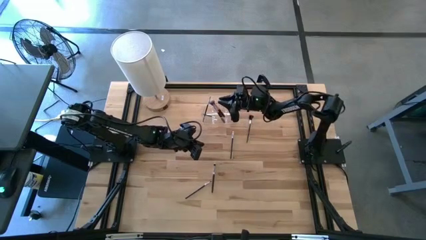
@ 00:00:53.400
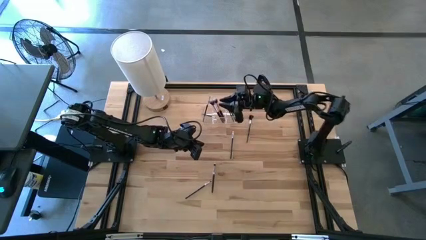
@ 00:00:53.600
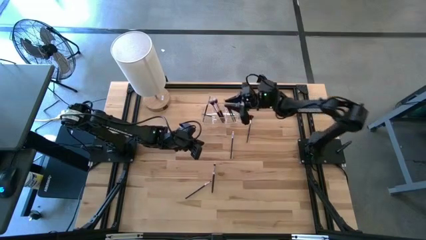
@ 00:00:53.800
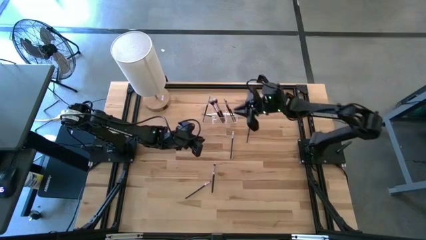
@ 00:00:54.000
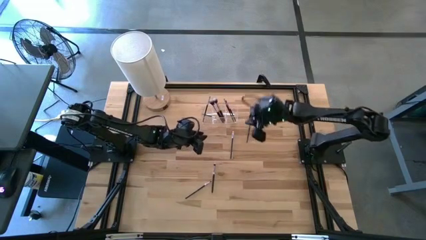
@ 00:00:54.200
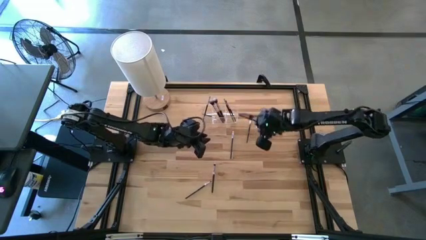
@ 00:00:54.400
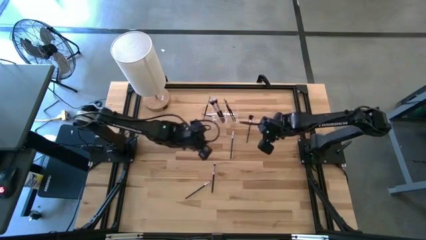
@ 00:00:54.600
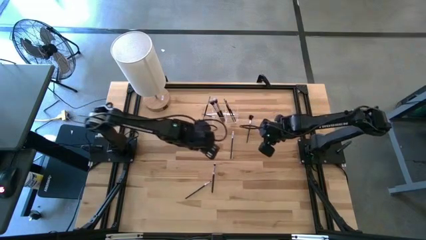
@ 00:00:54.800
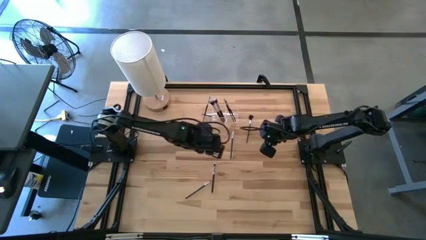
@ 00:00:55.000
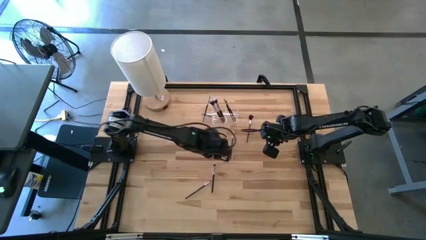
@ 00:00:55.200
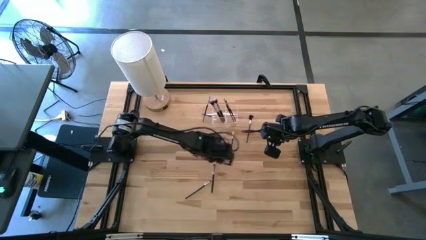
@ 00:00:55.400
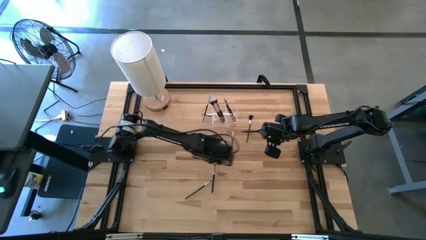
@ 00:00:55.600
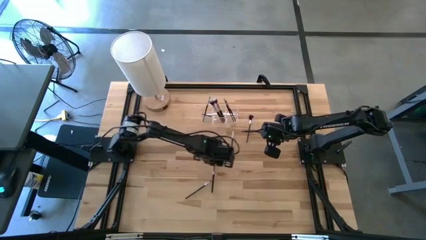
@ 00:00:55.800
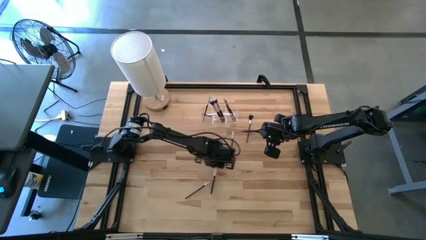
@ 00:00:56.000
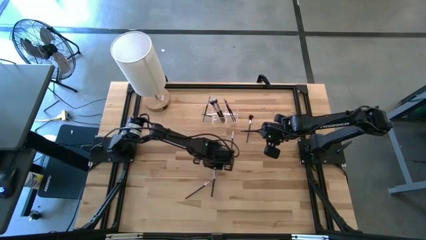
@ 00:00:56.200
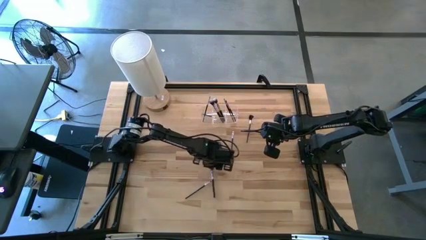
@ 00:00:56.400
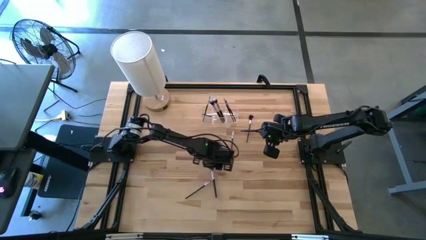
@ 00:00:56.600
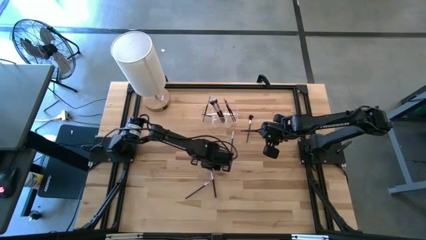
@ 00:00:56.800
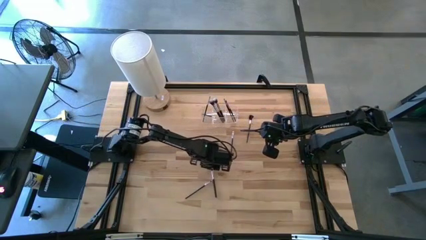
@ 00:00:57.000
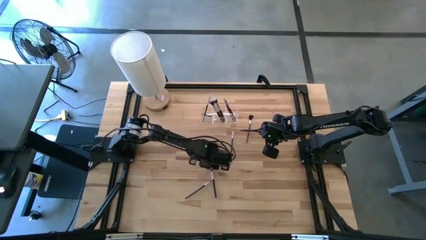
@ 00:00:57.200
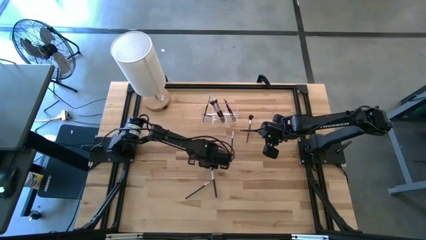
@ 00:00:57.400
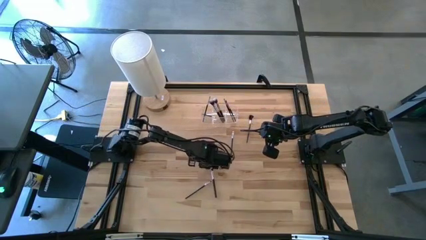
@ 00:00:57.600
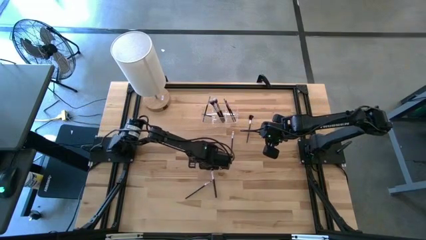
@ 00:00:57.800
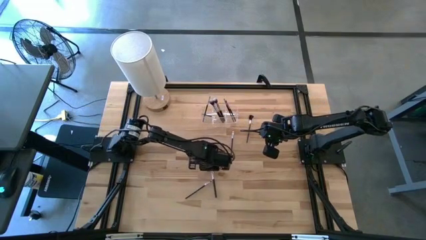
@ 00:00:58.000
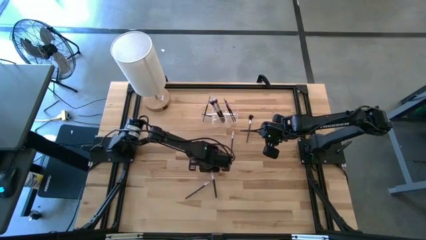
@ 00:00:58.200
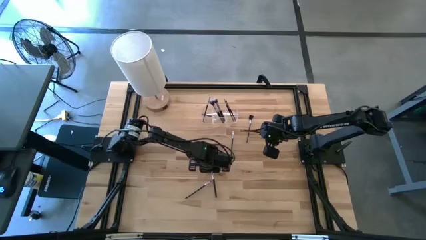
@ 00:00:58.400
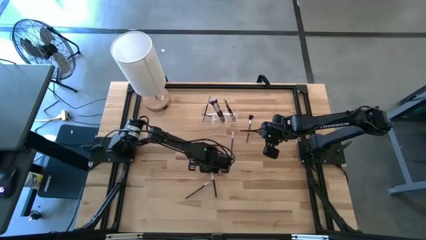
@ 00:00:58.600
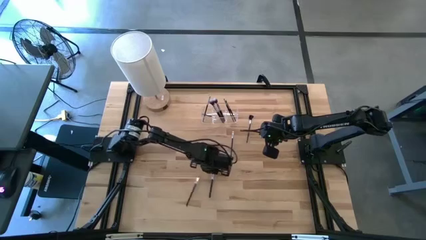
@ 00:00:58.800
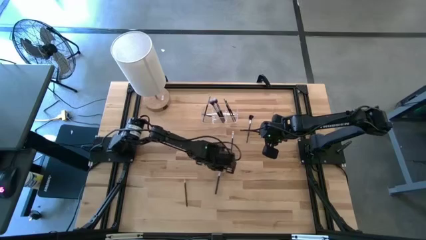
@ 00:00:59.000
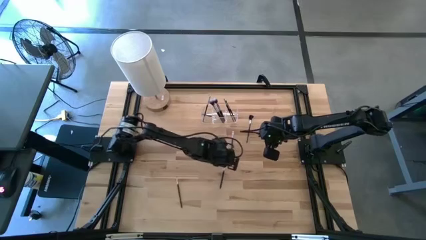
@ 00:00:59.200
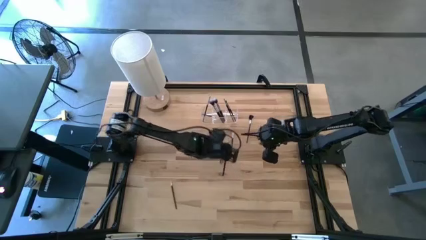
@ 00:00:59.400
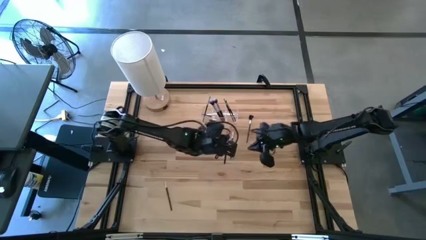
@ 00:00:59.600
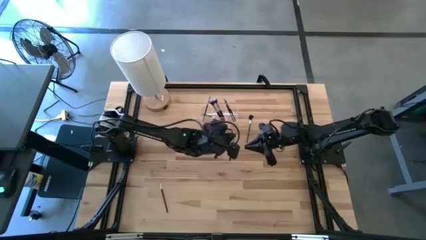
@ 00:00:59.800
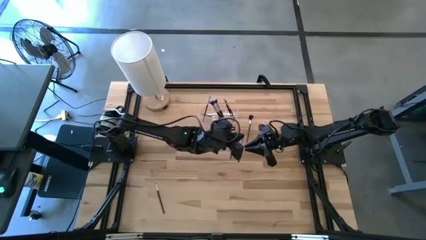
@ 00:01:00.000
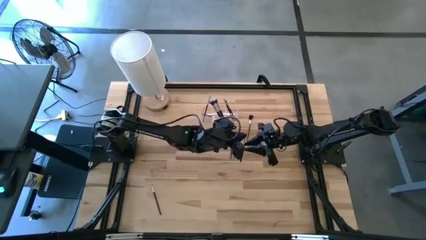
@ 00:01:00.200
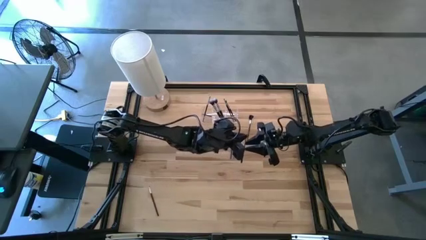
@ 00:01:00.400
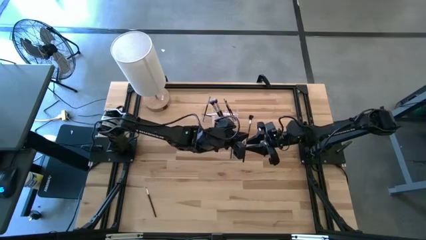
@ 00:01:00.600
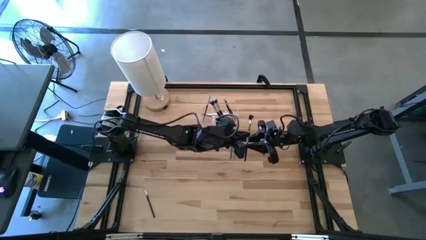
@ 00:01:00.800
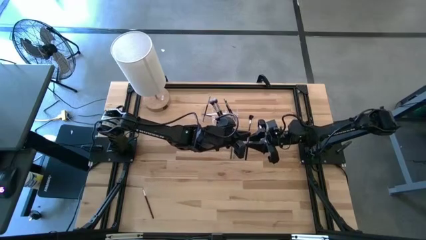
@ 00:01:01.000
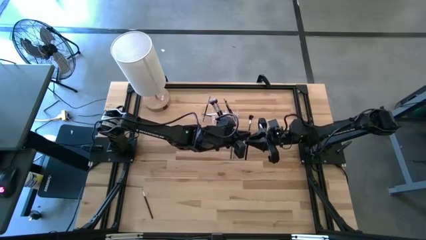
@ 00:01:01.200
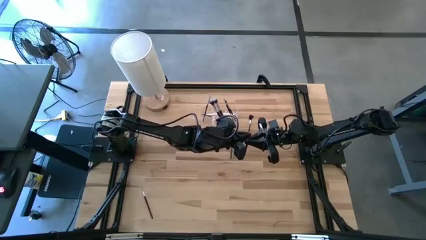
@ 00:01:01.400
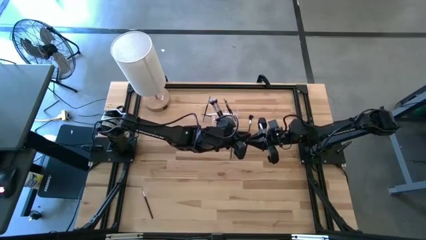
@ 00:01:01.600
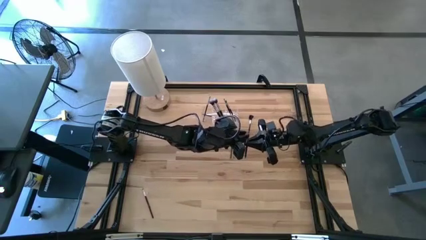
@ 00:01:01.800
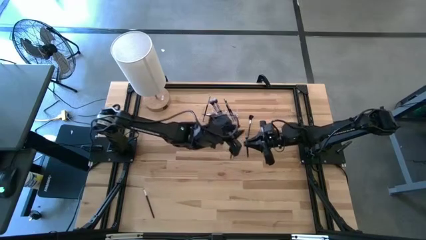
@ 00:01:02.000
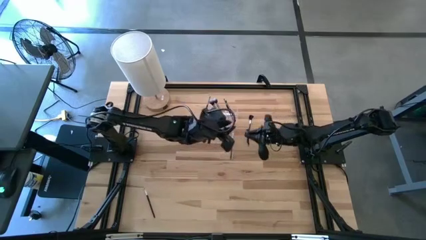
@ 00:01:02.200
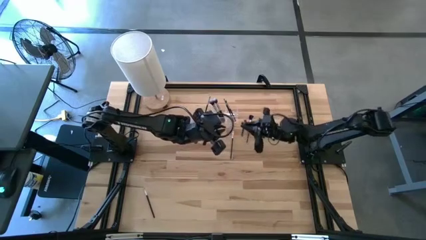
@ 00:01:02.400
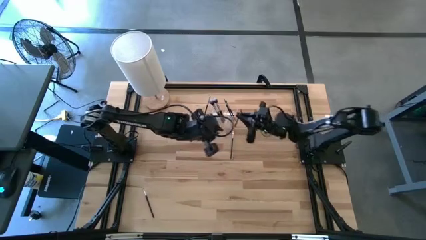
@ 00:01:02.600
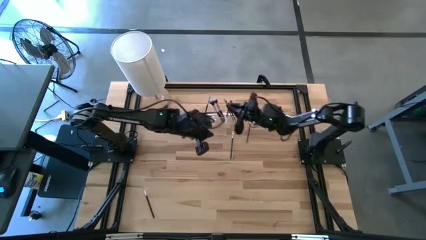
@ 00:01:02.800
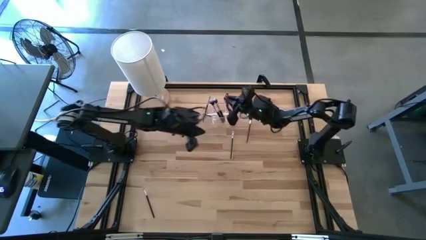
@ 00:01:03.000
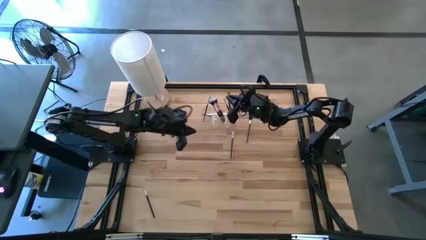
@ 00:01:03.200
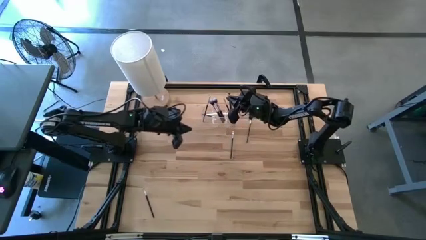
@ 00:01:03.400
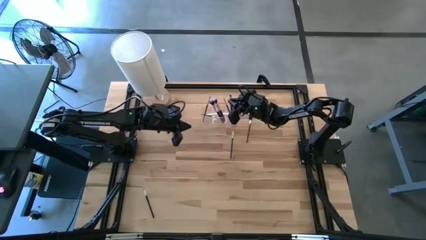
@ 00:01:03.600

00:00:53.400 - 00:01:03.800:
Task: Put items in baskets/containers
Put the black eyeshadow brush into the transparent organizer

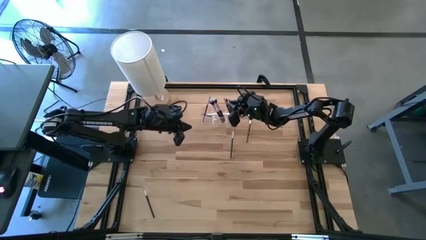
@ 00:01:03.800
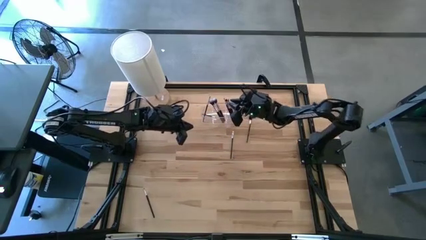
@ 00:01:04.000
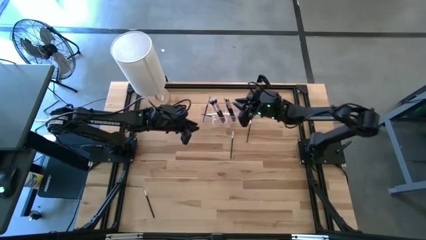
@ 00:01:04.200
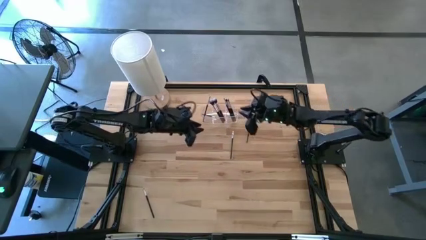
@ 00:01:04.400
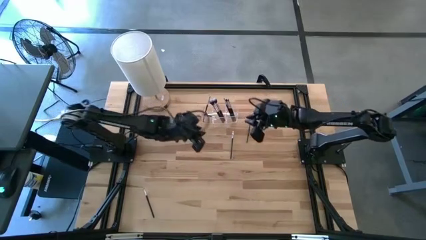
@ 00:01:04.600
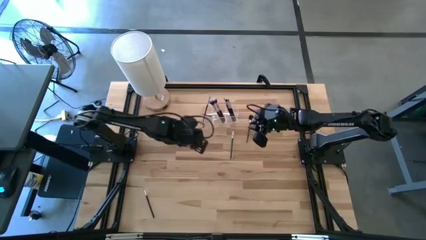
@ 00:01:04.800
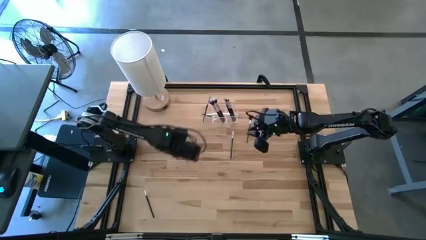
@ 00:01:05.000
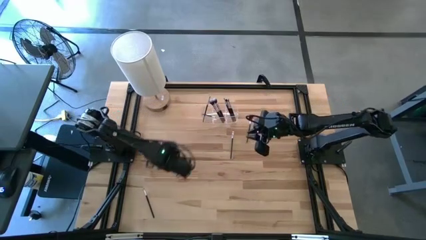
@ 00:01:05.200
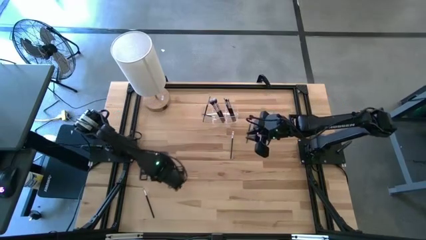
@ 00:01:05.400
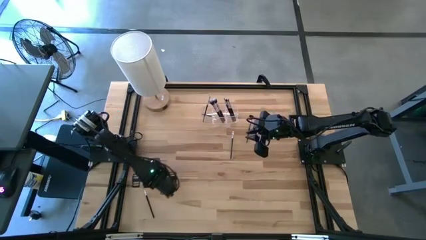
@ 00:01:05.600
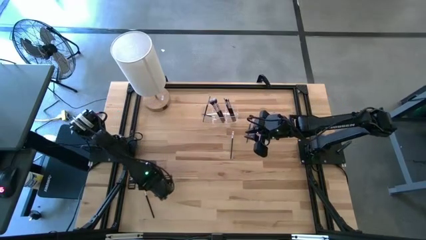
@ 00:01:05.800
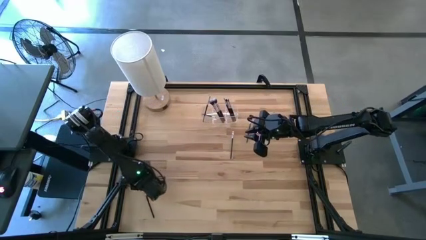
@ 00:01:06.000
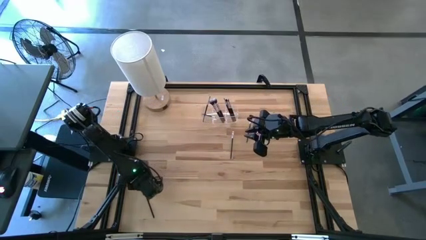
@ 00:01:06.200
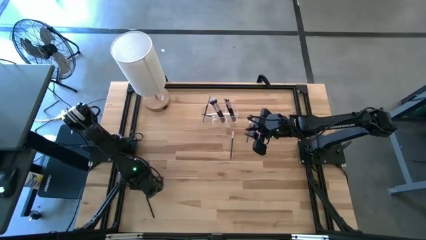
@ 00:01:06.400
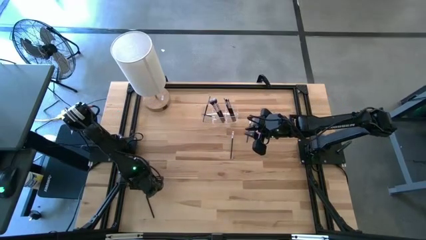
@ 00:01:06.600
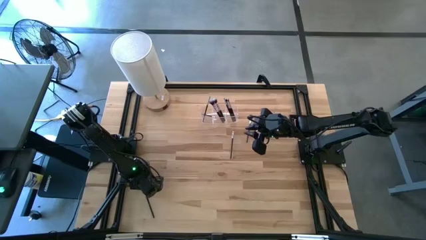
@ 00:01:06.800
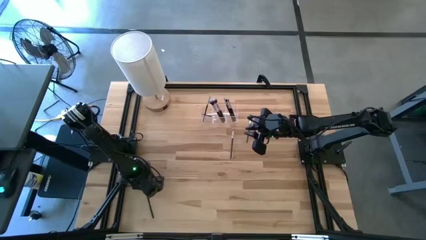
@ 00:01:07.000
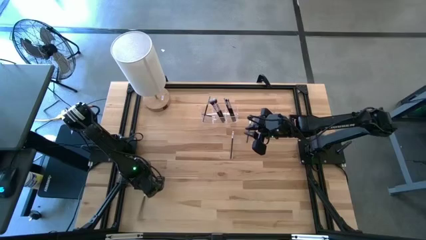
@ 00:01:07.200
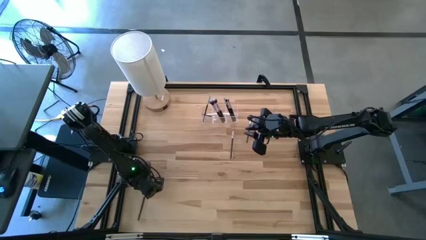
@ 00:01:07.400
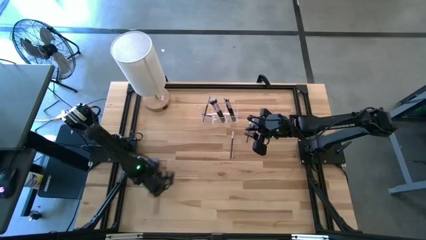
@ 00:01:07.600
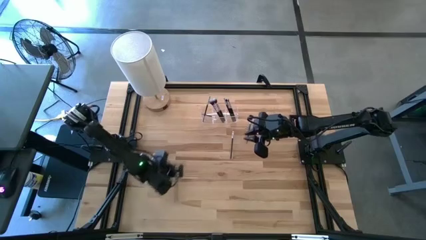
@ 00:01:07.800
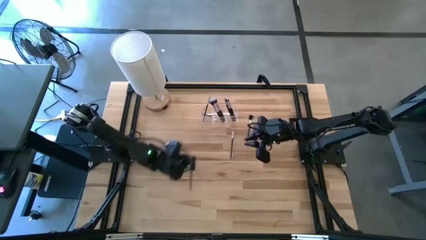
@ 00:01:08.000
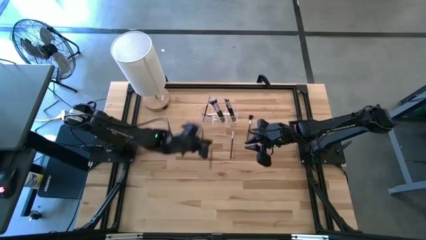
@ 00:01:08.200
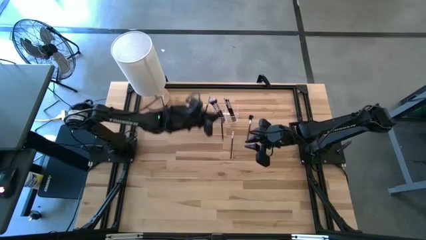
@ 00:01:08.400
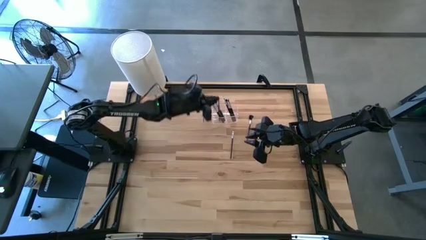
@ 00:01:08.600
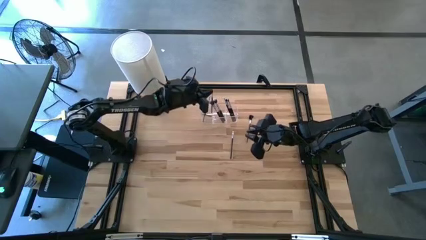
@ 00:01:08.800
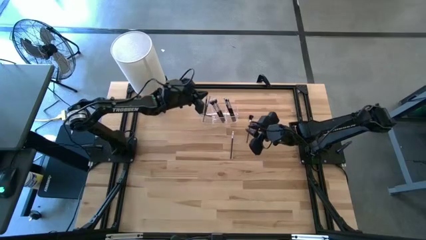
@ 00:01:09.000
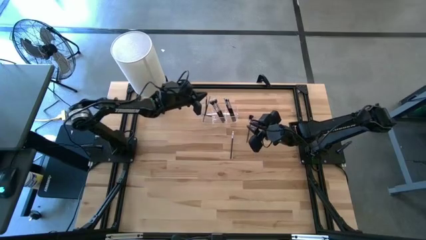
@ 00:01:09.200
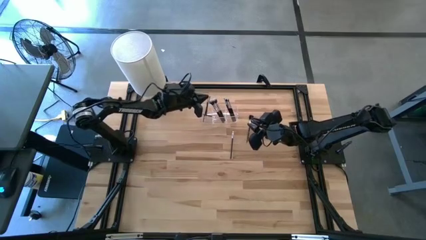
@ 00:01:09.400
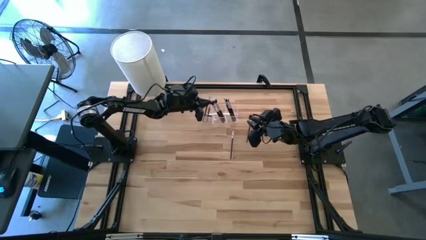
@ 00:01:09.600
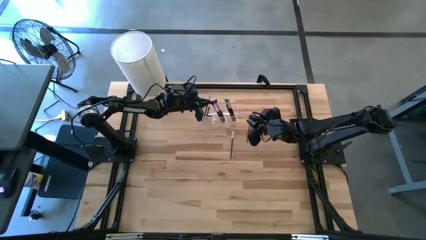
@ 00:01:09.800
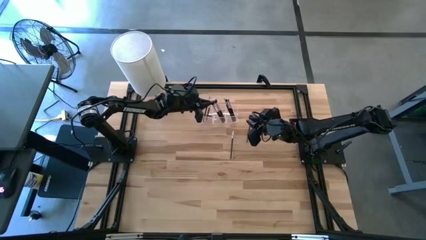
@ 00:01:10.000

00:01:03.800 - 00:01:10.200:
Put the black eyeshadow brush into the transparent organizer
